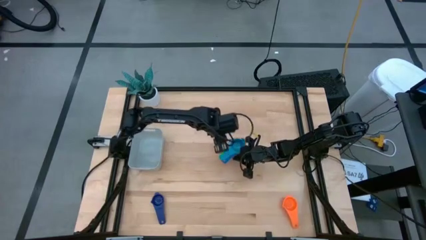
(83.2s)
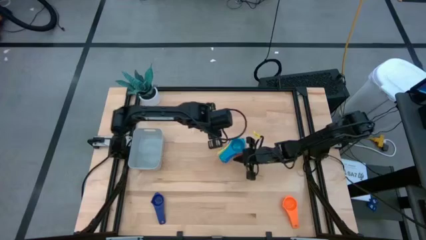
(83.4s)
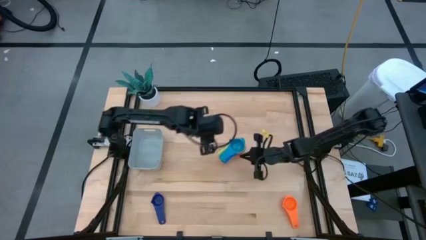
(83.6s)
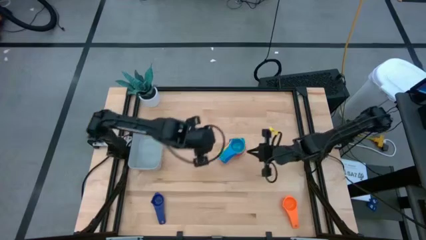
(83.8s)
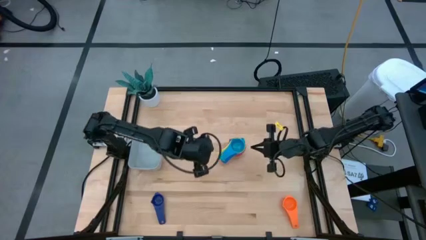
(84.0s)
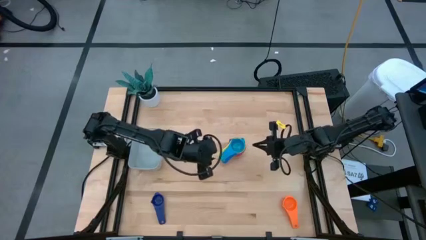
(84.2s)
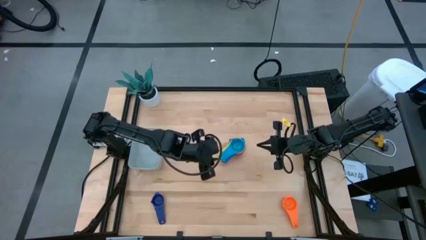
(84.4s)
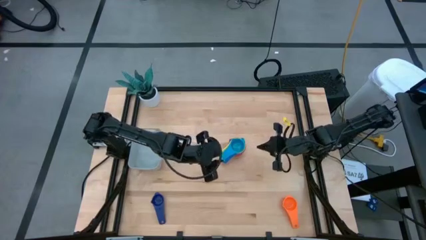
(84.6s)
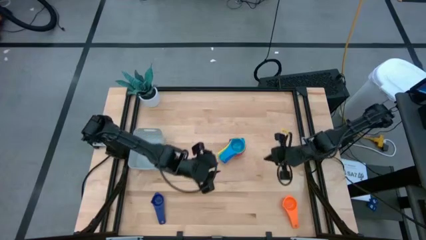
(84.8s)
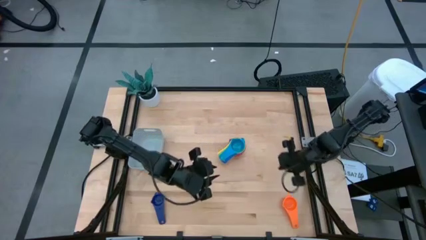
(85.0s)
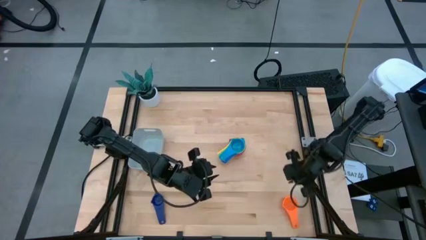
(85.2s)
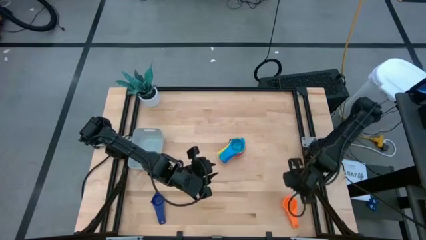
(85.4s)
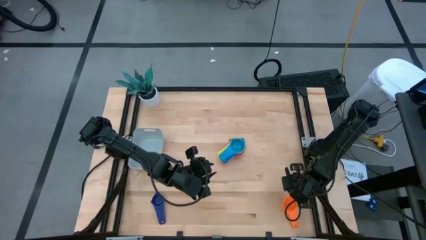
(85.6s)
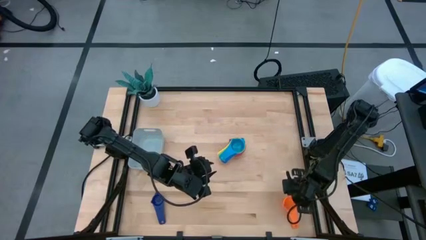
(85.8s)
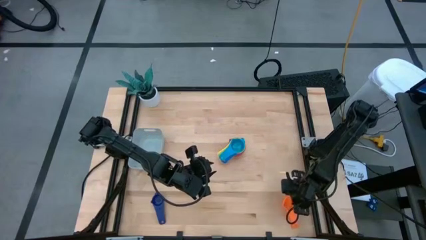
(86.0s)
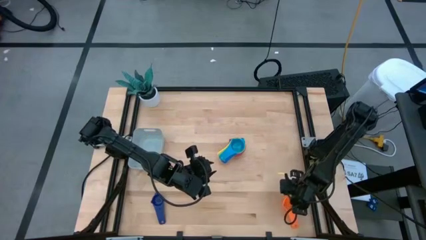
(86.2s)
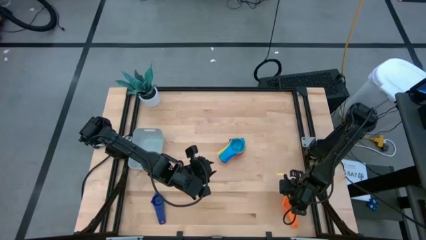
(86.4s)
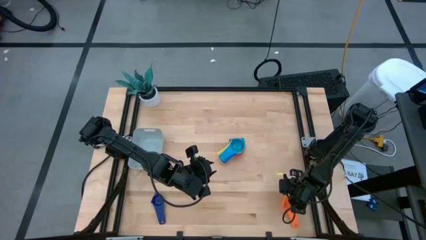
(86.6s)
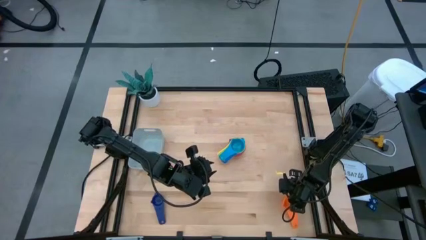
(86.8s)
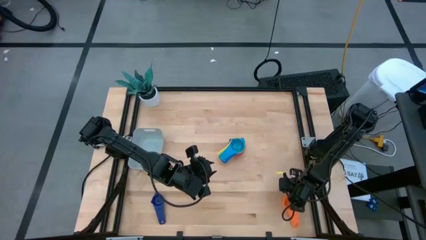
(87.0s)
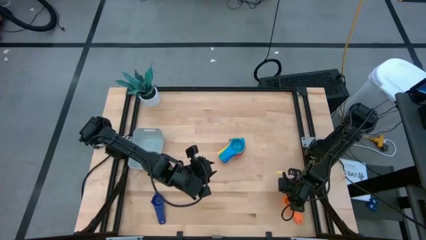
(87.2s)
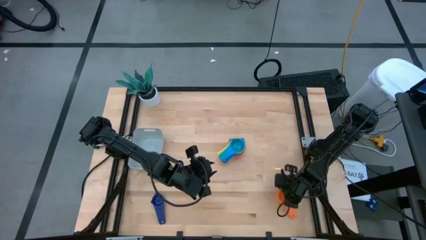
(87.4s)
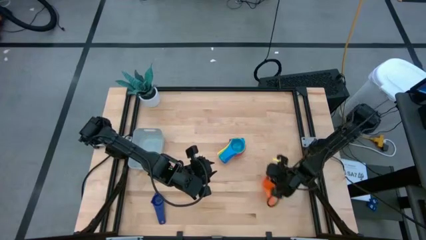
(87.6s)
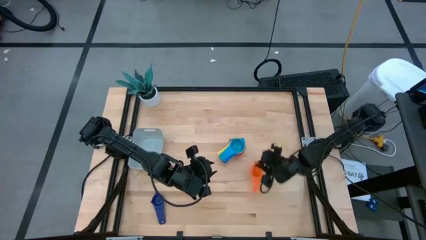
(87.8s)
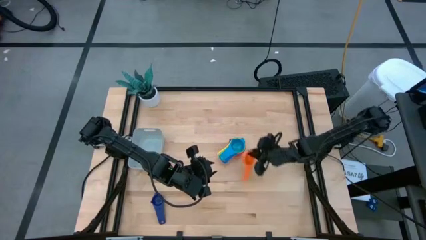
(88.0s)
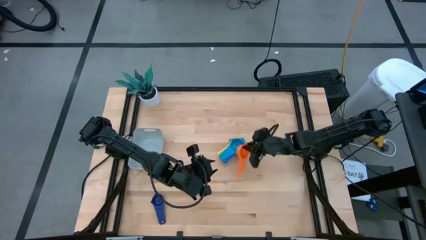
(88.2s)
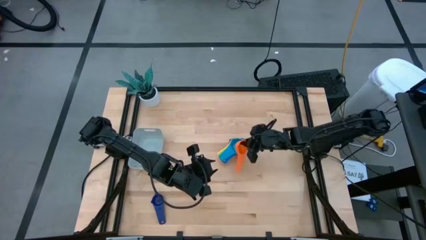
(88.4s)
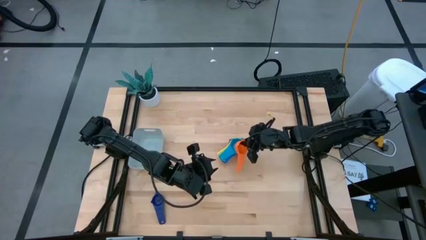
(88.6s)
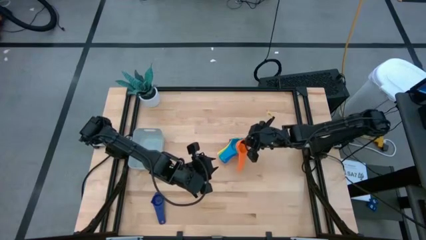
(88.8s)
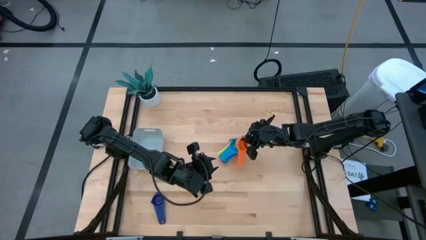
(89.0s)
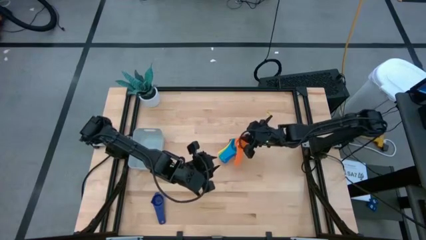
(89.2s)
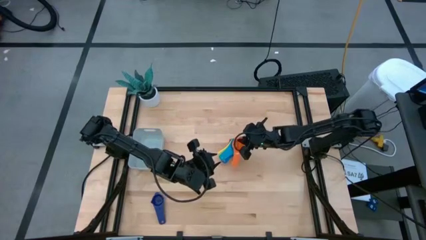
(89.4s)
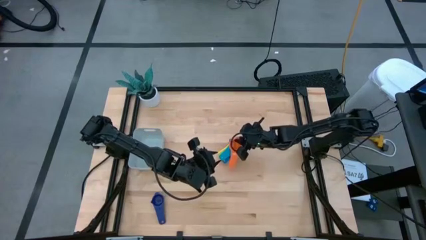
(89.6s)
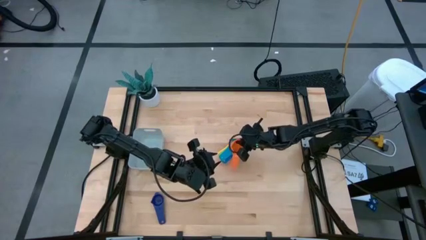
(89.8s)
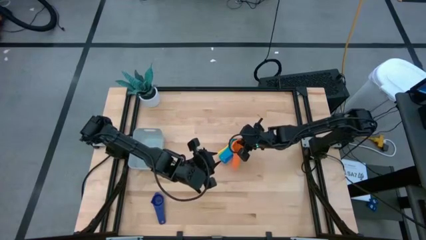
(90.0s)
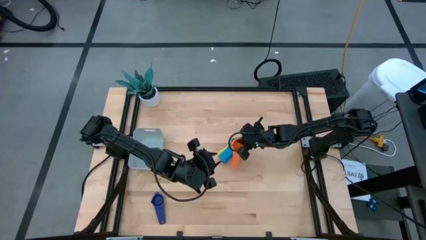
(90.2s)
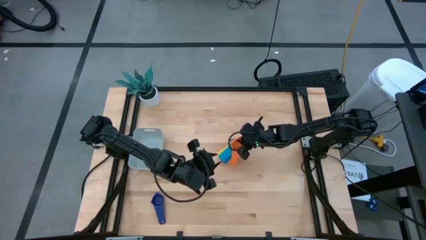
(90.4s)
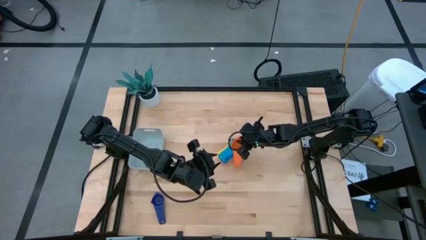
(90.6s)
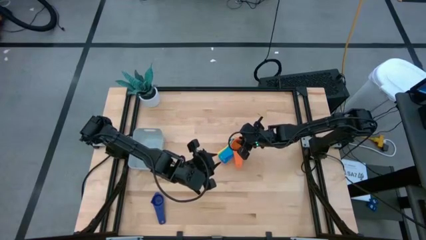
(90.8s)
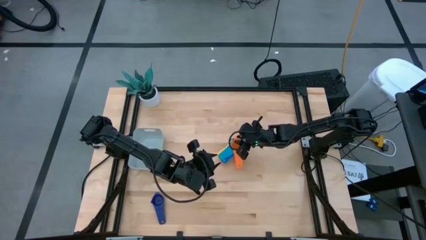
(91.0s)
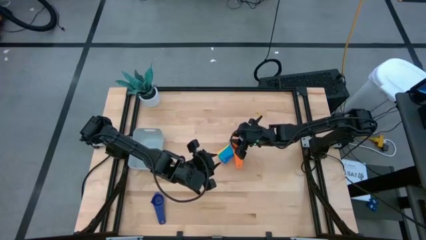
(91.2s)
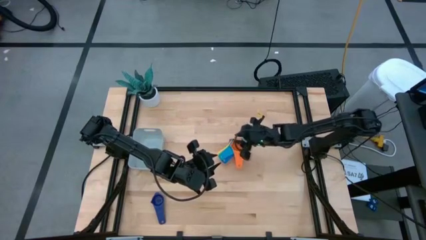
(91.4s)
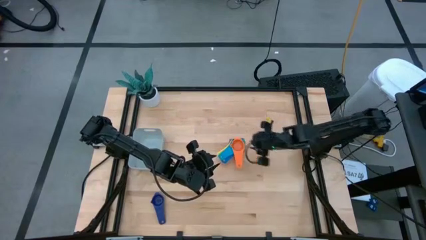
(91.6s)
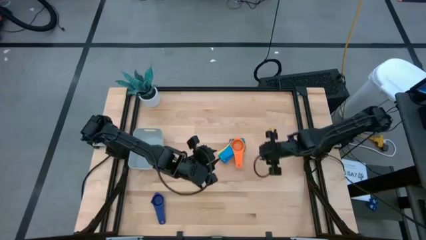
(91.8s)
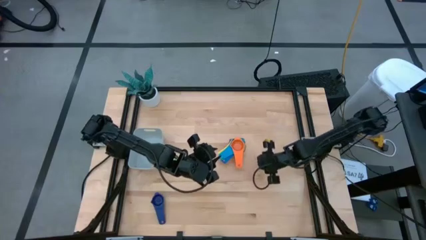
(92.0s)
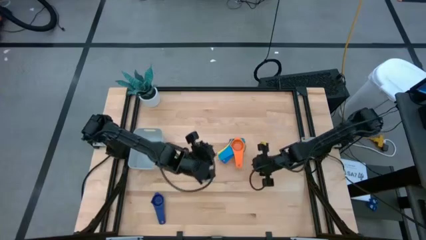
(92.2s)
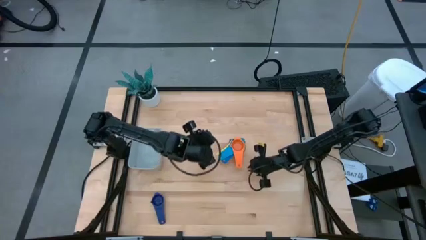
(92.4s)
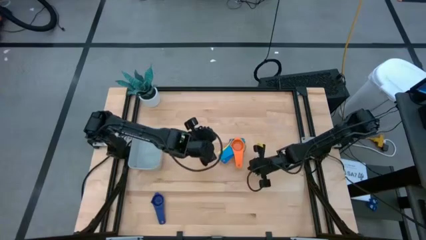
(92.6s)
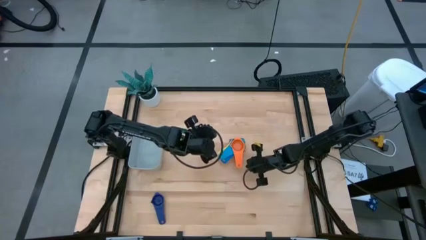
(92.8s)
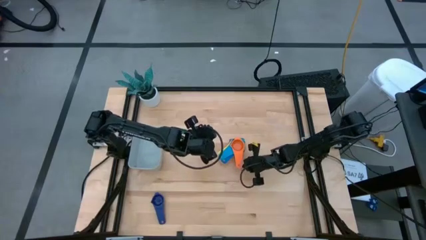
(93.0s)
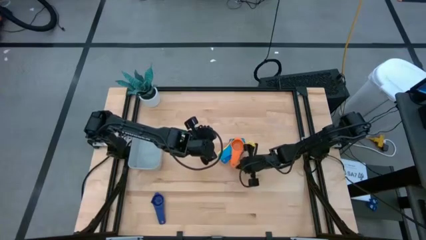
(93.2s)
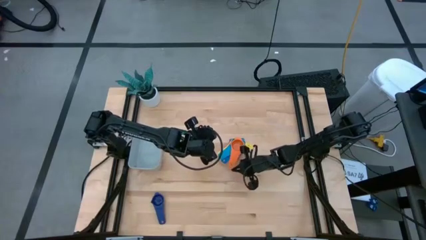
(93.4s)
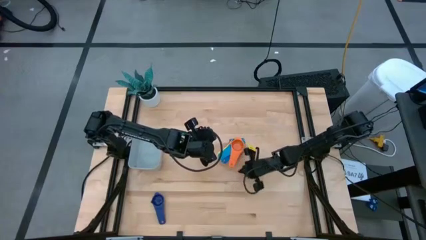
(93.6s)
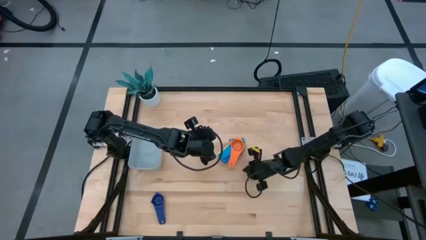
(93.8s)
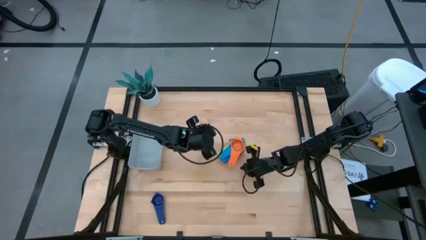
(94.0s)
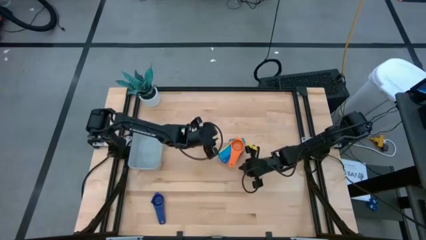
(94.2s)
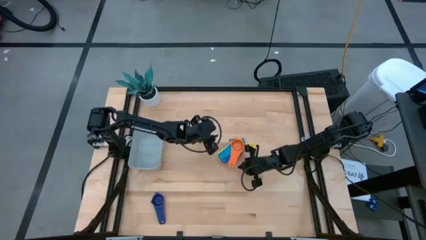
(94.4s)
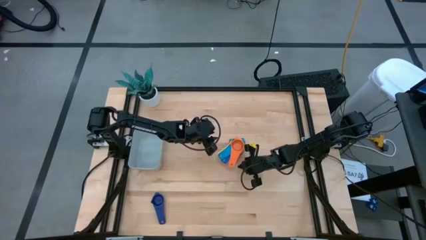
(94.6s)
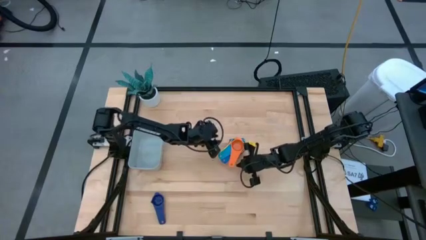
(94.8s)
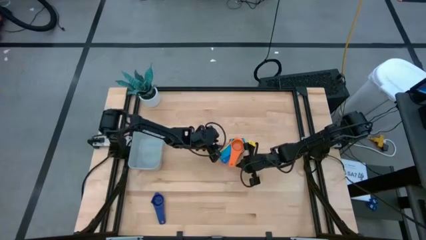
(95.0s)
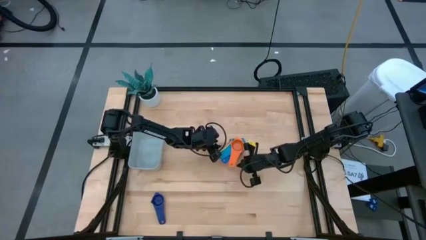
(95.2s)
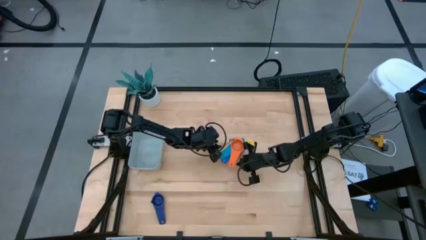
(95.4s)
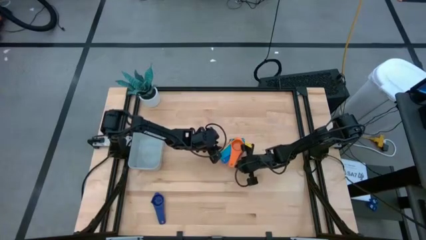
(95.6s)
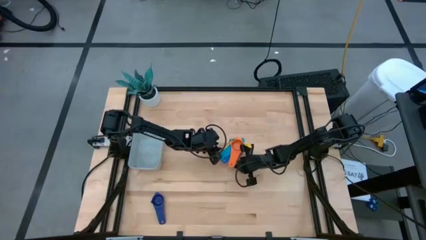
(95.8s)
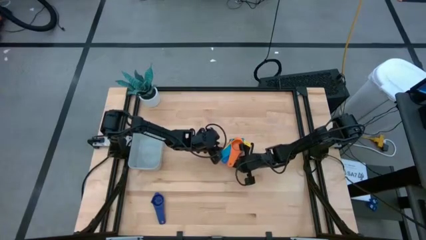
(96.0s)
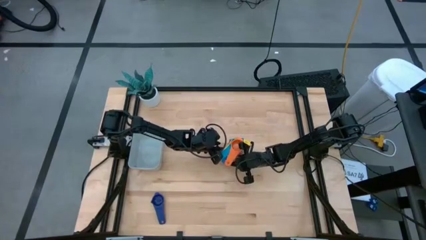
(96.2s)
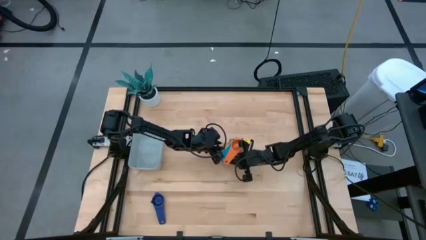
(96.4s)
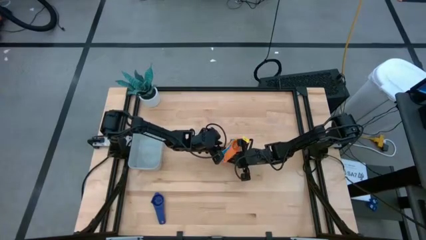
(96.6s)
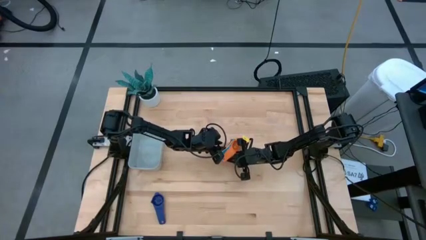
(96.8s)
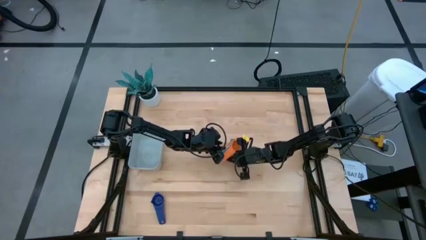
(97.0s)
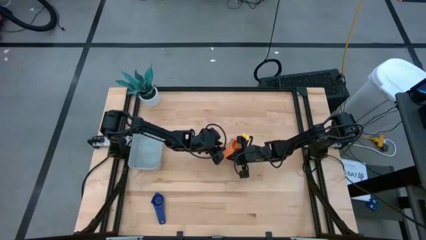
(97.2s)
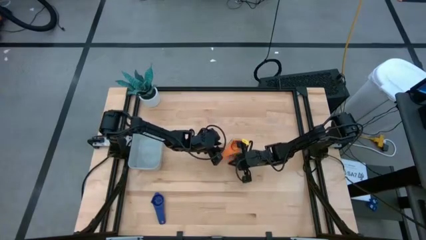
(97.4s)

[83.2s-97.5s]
Task: Nest measuring cups in basket
Stack the orange measuring cup on top of the light blue measuring cup
